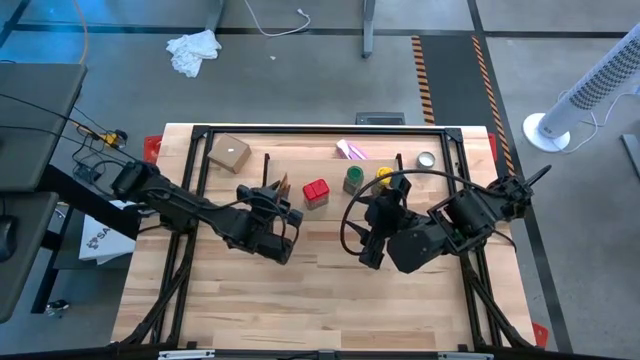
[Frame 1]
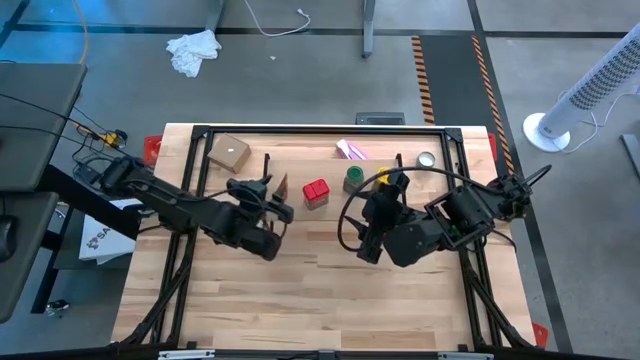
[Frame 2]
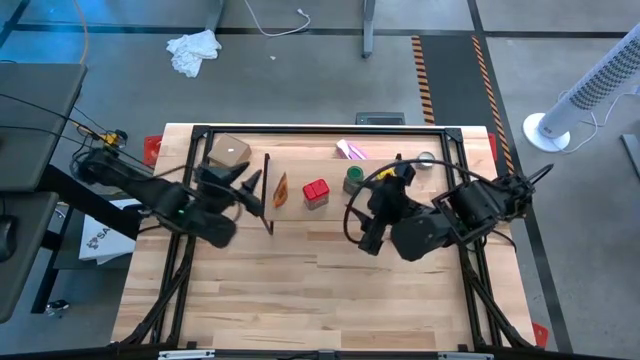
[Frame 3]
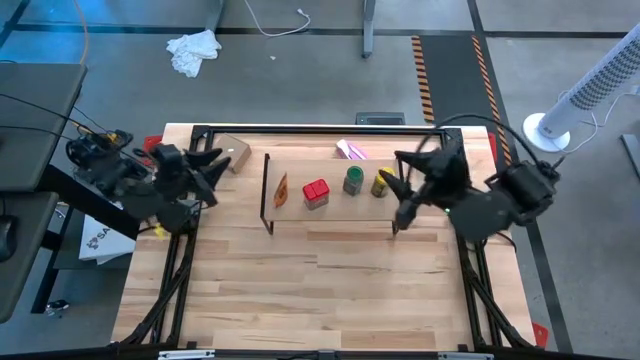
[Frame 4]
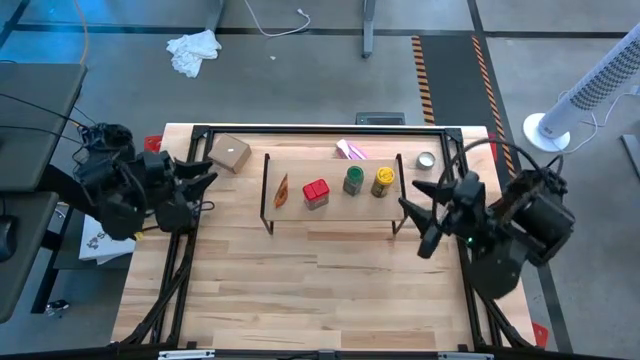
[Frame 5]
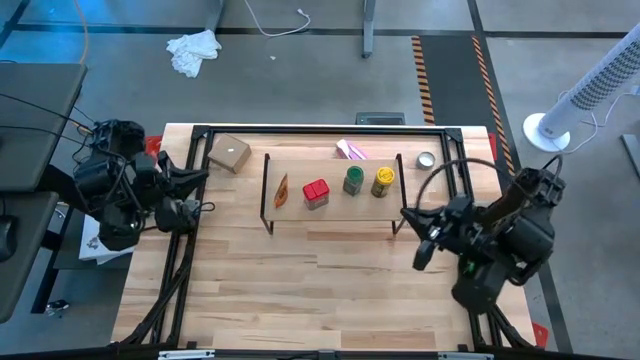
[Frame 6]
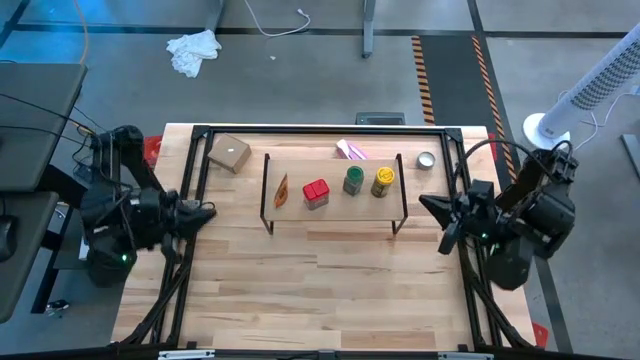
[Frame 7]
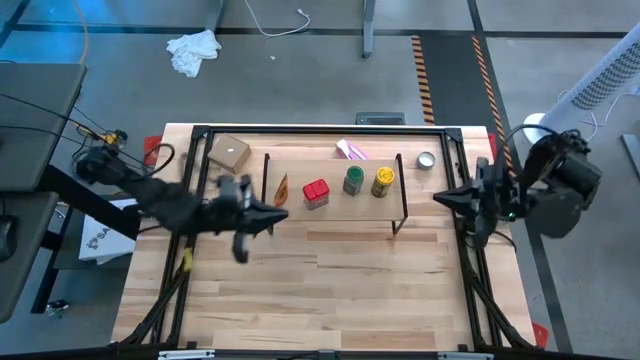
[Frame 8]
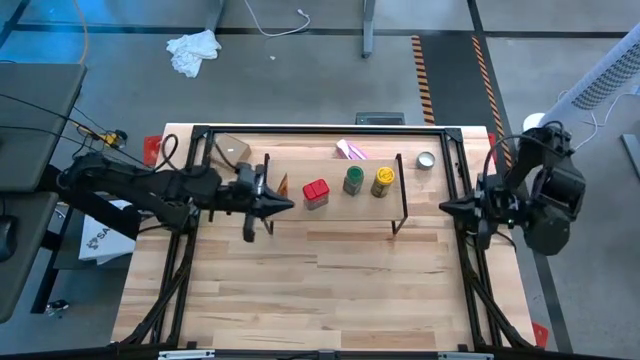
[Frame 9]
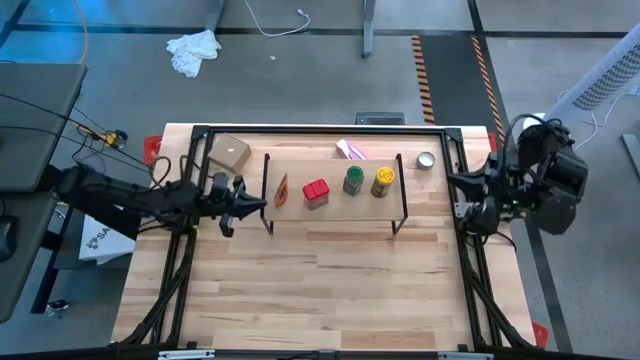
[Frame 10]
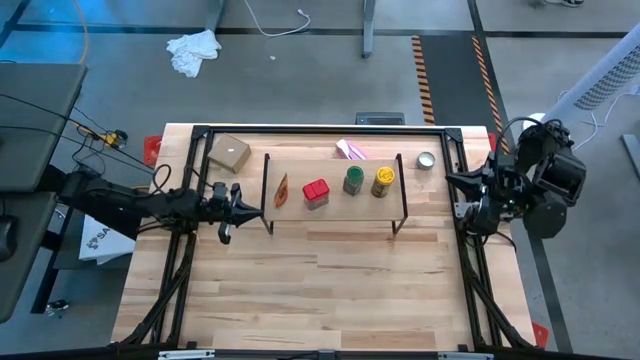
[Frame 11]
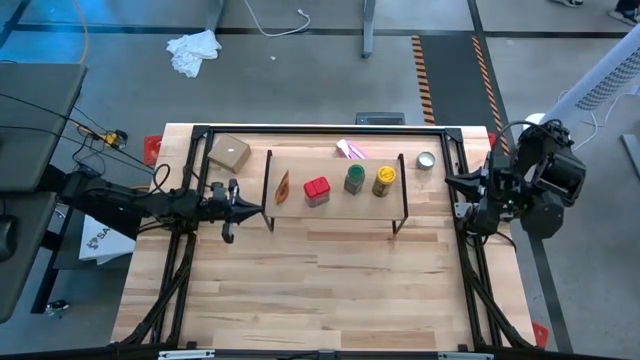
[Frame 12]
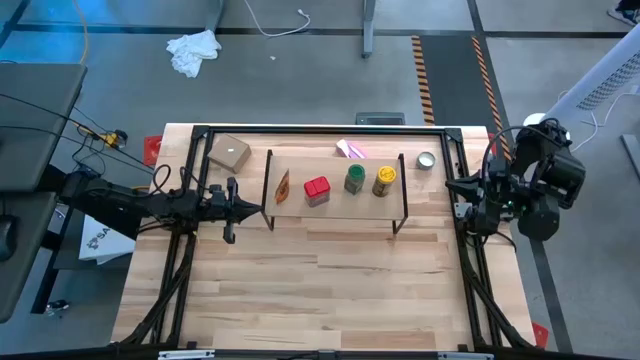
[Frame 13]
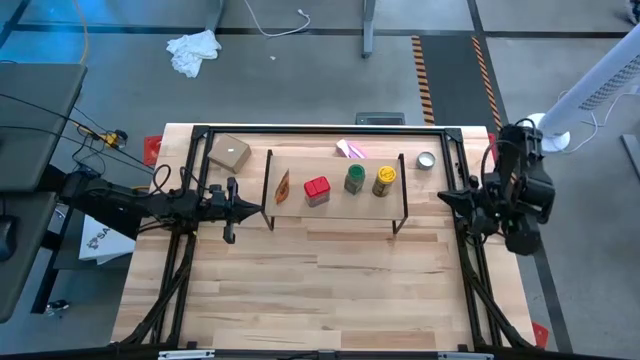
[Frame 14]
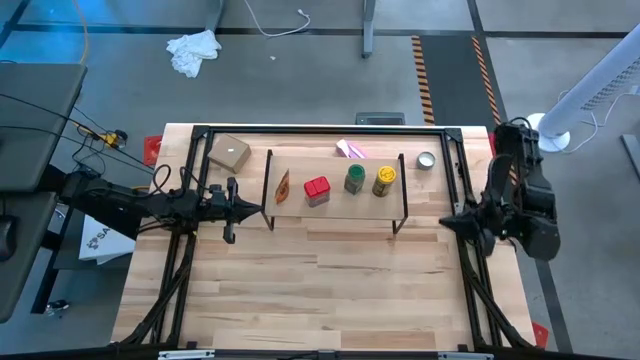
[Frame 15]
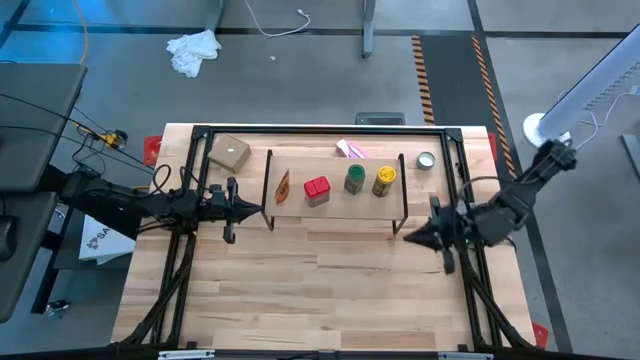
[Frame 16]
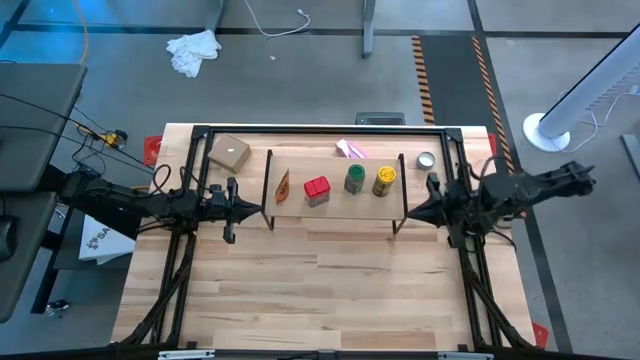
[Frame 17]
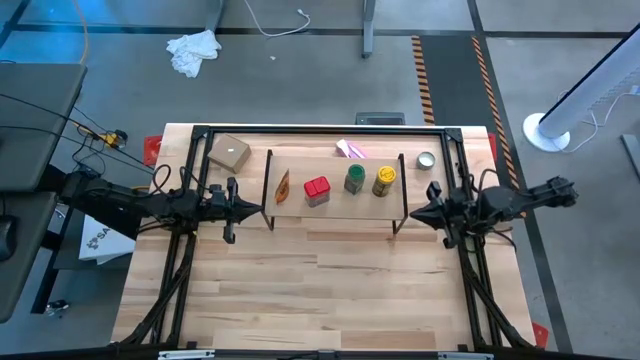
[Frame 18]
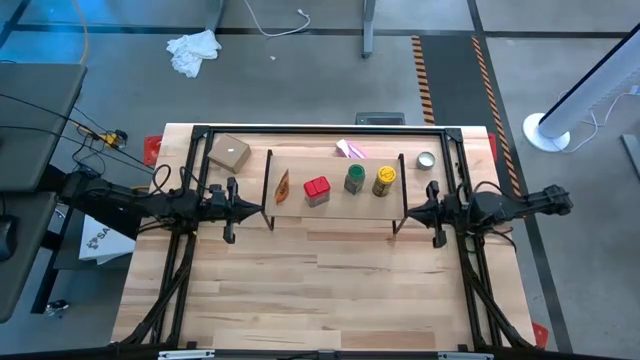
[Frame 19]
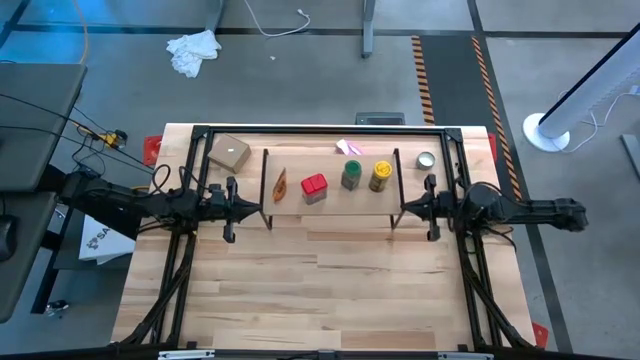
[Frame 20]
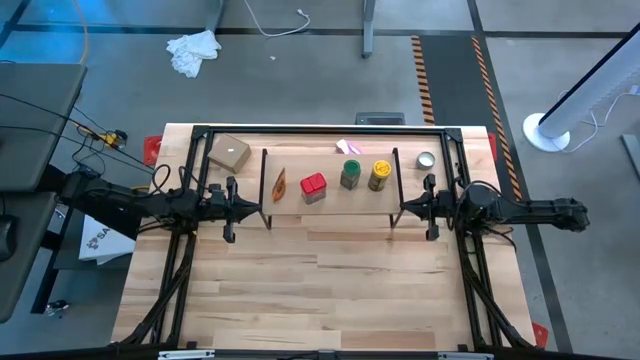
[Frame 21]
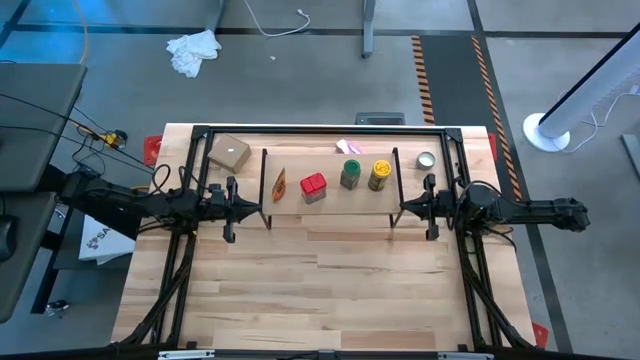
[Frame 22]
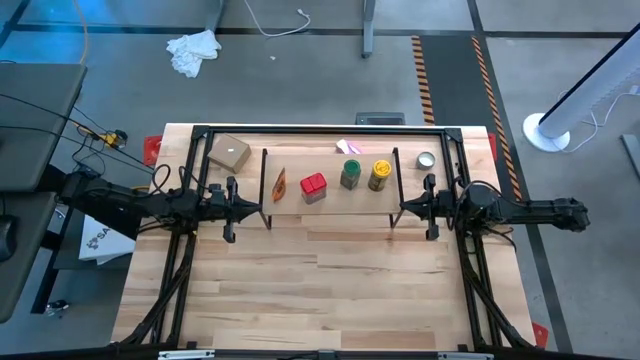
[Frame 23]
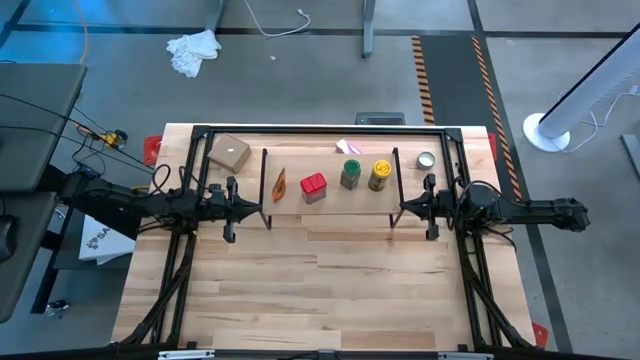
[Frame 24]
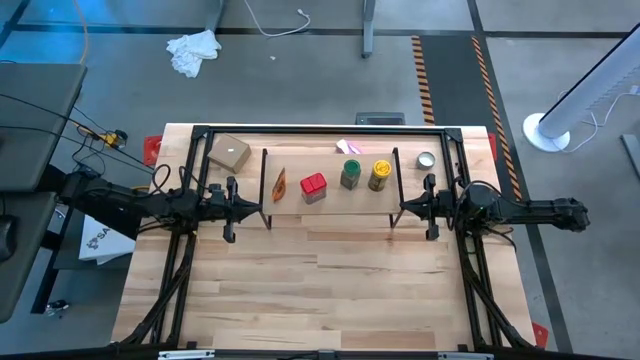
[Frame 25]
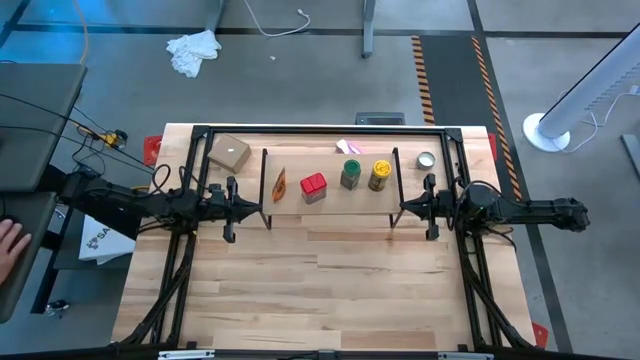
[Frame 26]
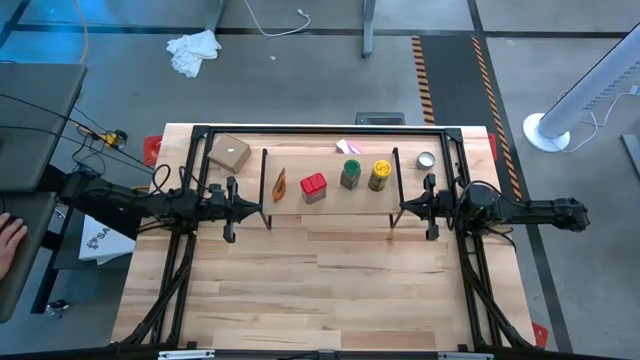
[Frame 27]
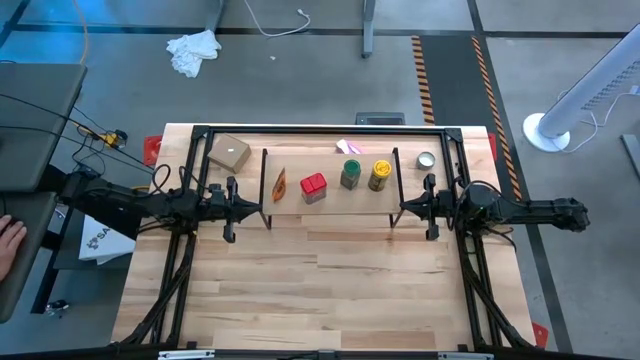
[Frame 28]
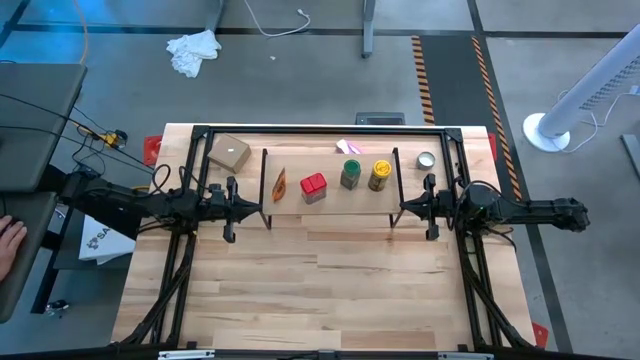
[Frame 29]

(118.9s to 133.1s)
Task: Shelf spices
Return to Home Position

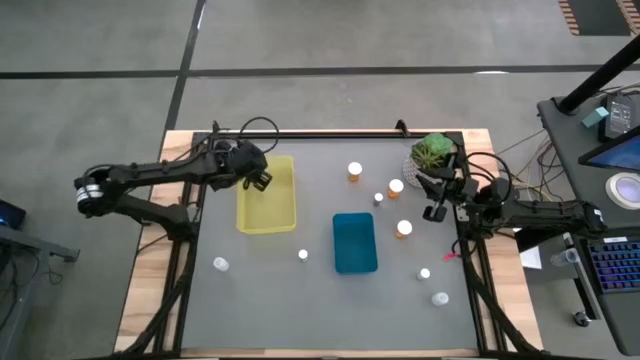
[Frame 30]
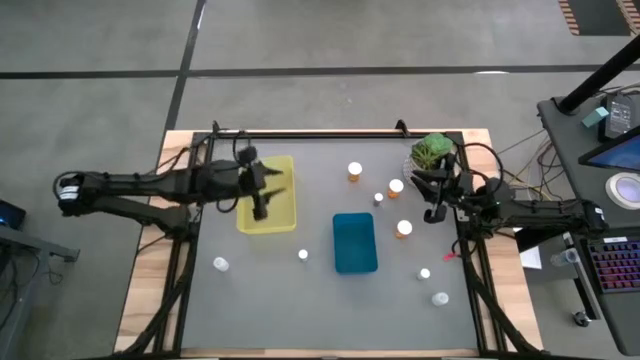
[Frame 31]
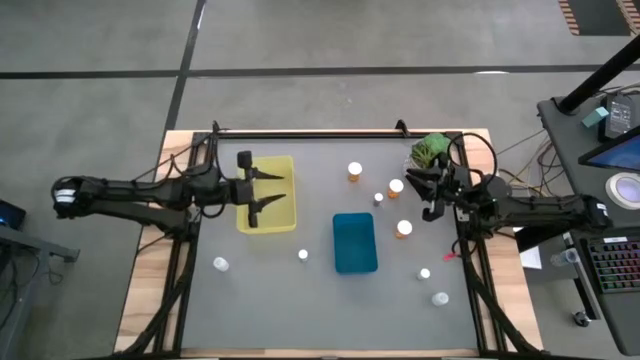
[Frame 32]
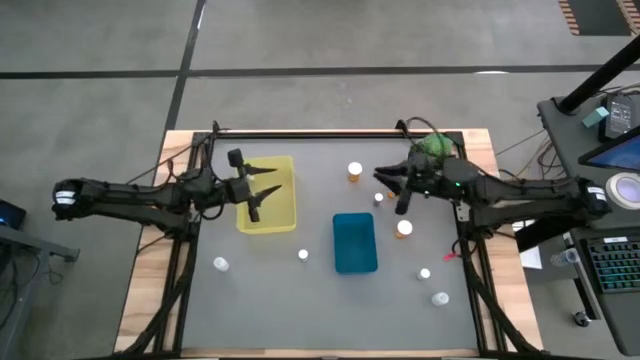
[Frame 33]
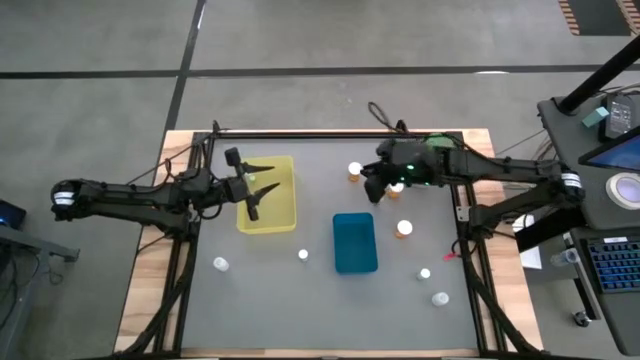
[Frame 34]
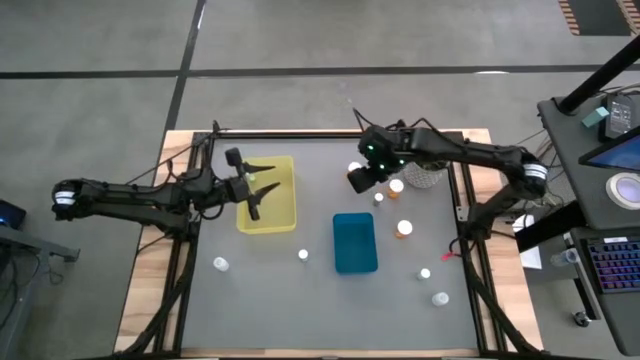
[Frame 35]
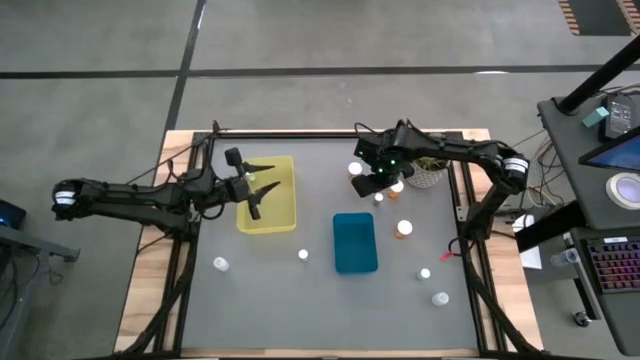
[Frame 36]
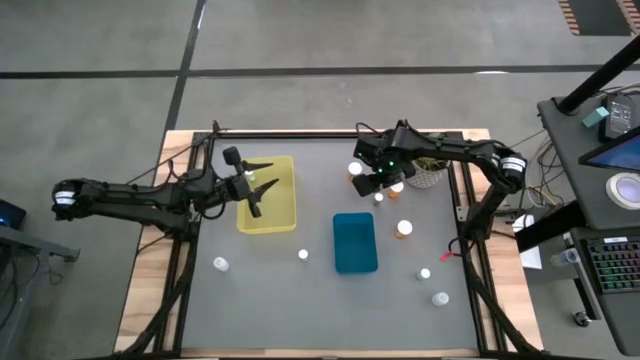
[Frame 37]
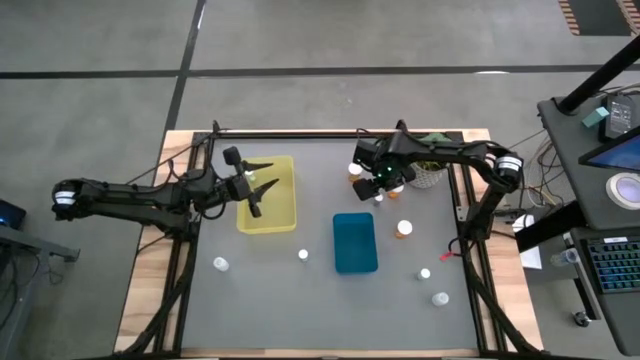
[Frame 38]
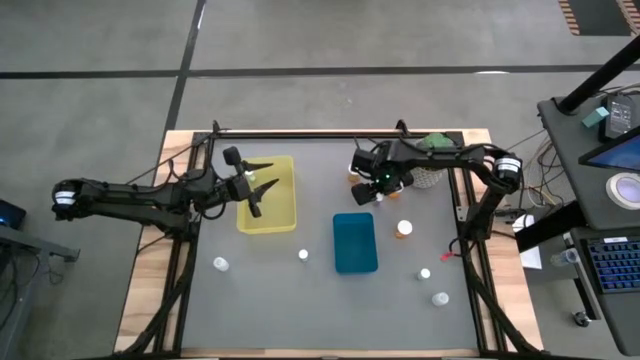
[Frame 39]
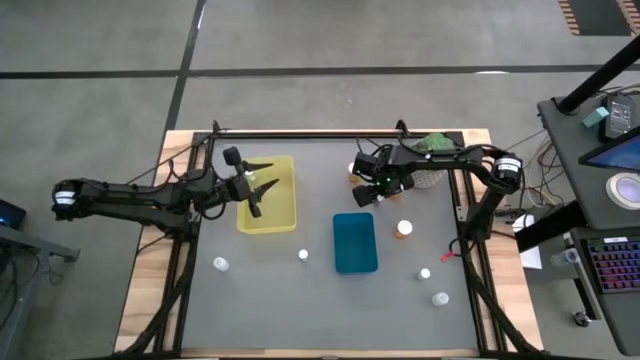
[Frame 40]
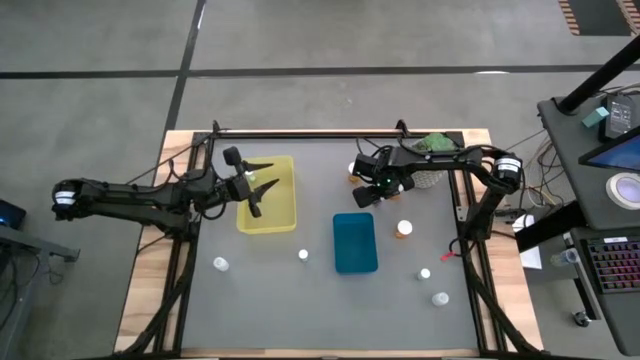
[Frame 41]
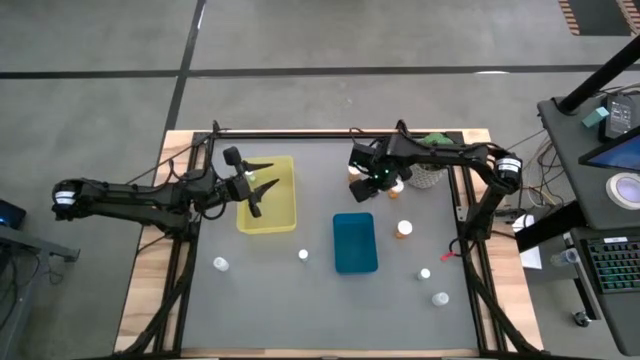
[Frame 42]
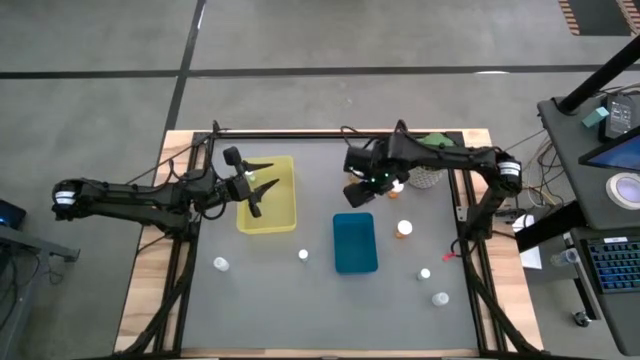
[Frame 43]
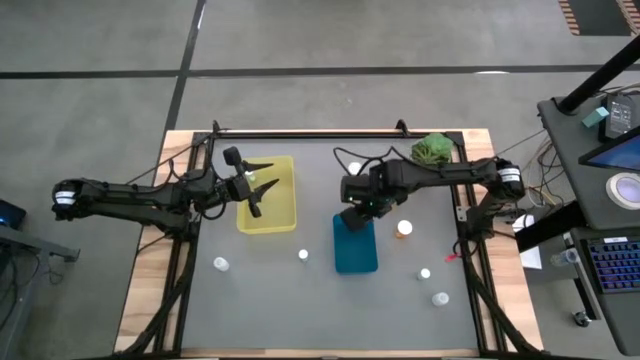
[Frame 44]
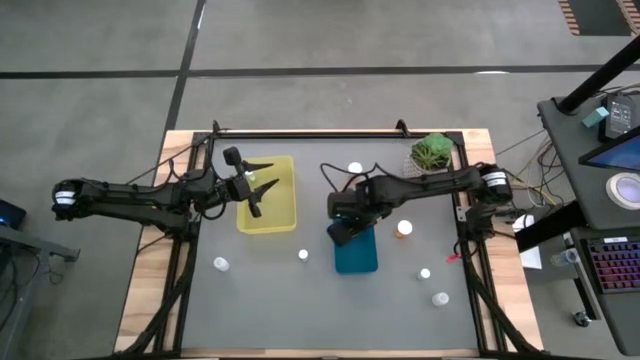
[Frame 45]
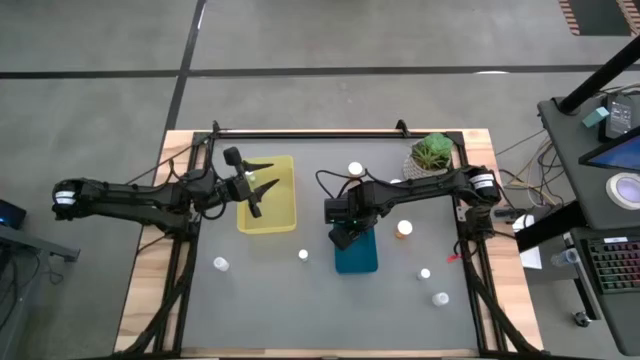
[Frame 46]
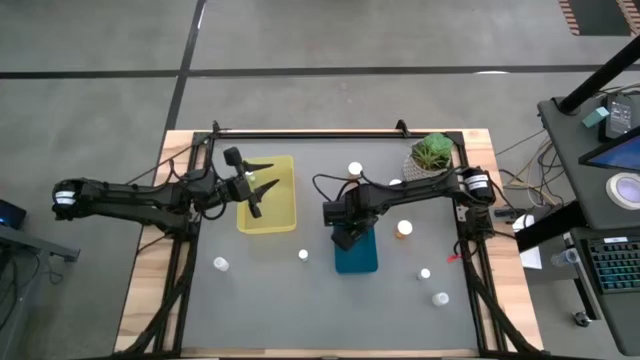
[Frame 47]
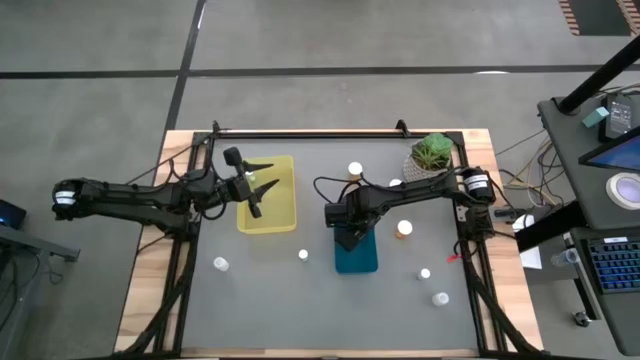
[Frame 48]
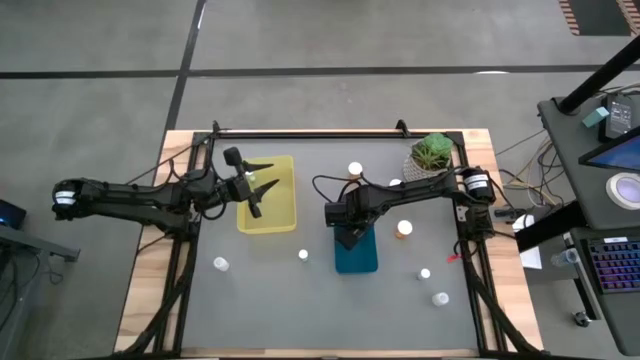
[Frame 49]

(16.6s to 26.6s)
Task: Pick and place medicine bottles into bin by pill shape (circle, oval)
Put the blue capsule bottle into the blue bin
